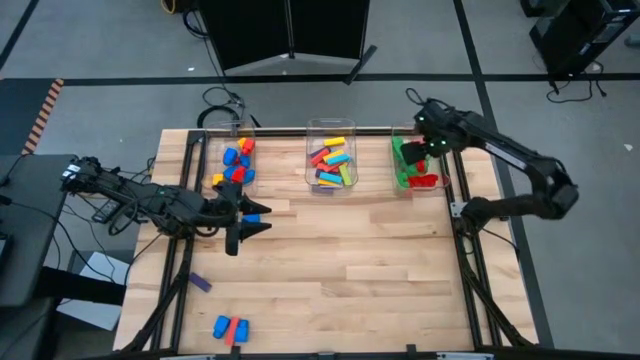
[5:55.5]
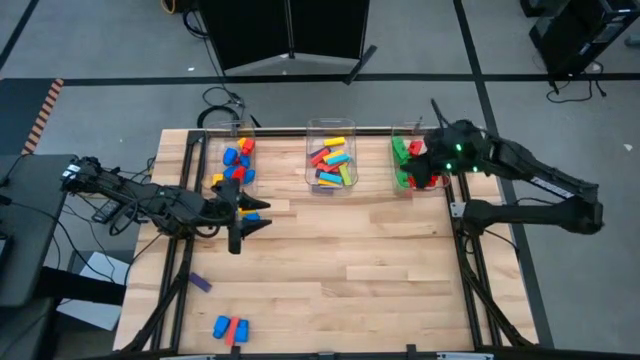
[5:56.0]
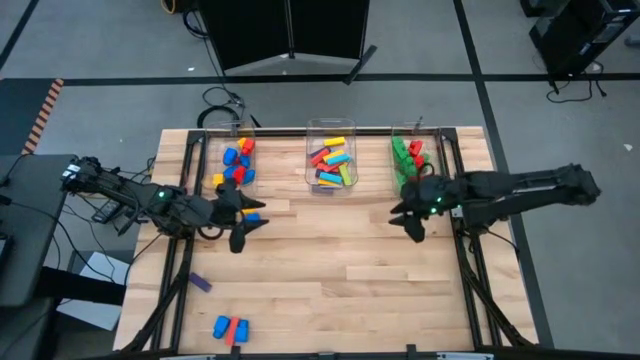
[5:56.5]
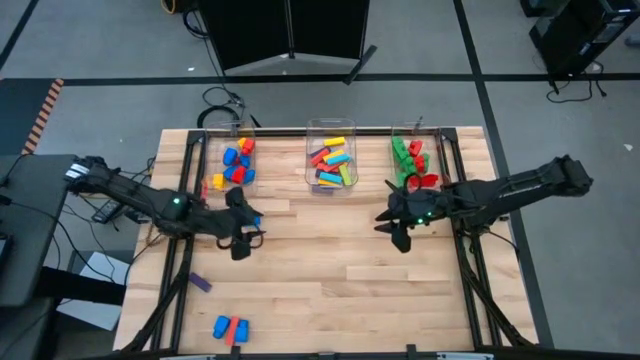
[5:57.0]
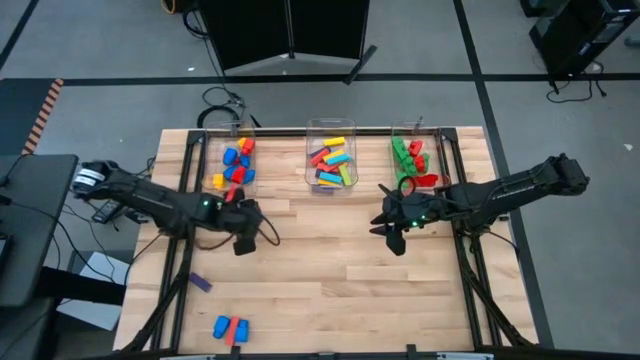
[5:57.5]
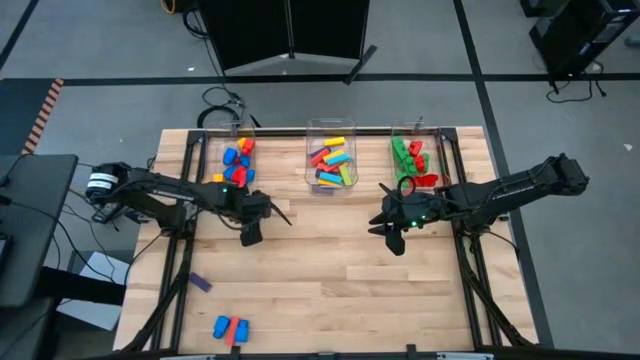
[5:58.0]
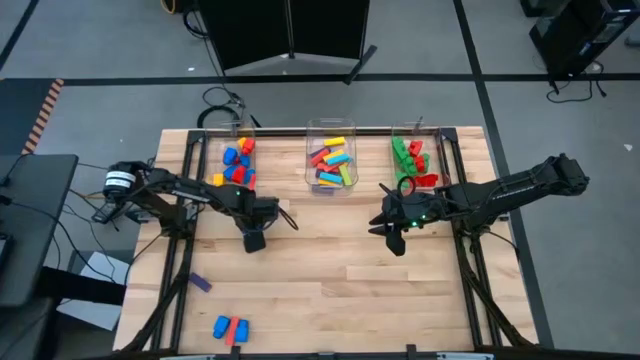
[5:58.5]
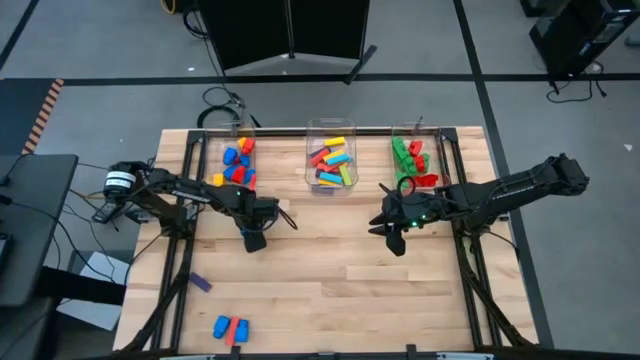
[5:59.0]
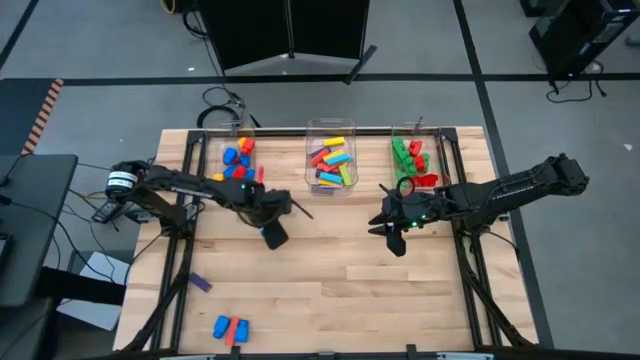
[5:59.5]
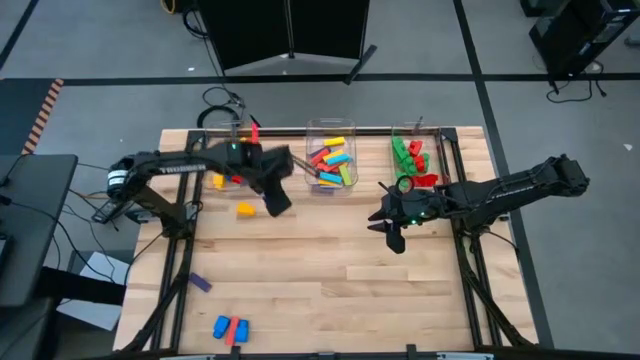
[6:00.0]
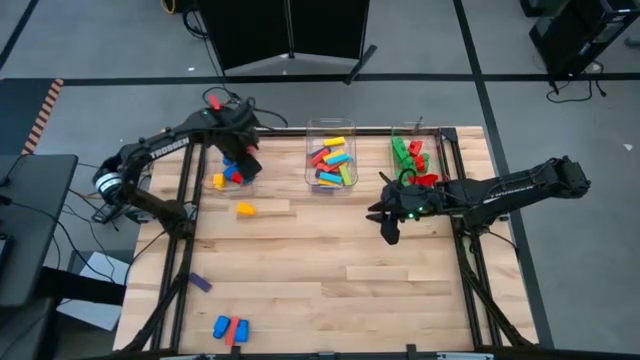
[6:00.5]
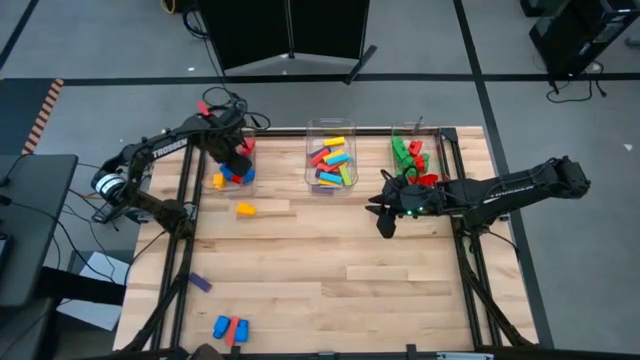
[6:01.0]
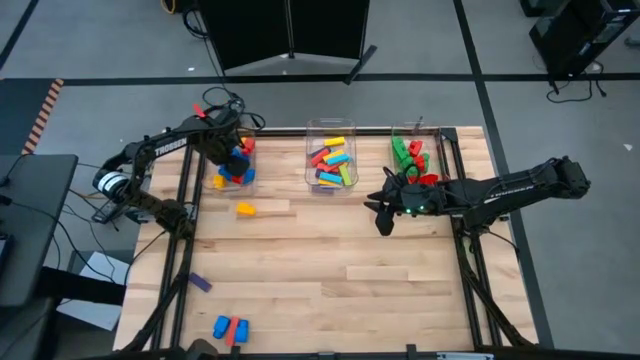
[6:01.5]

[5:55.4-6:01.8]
Task: Sort blocks by size
Put the blue 2 stud game piece into the right transparent bin

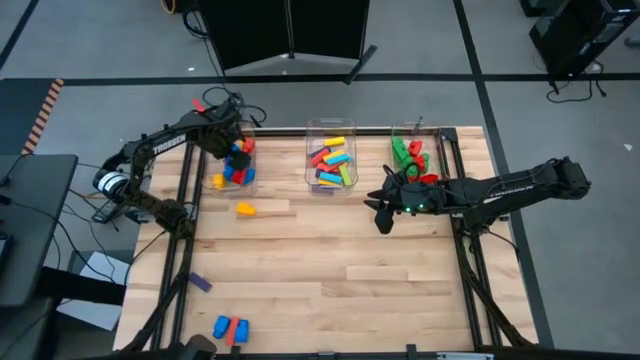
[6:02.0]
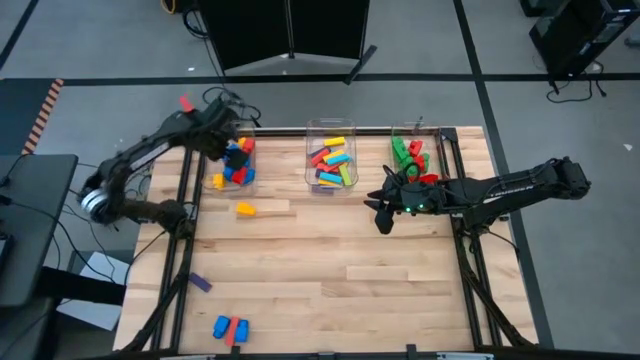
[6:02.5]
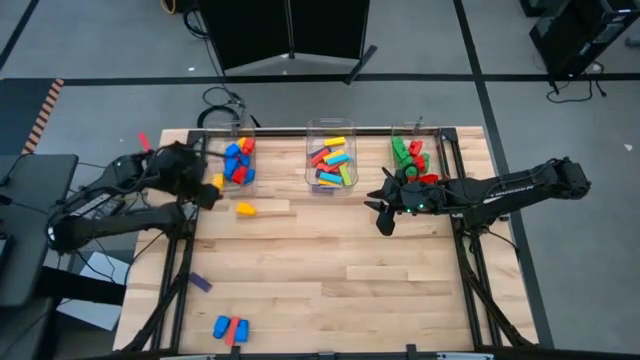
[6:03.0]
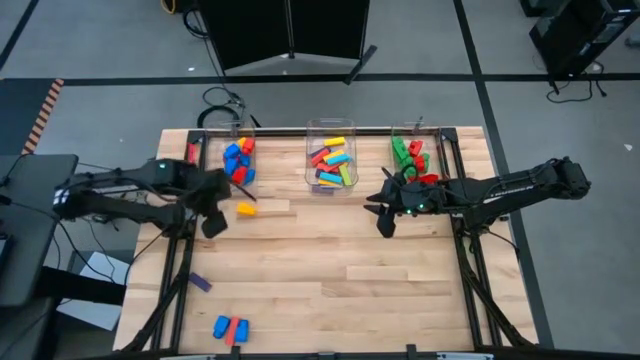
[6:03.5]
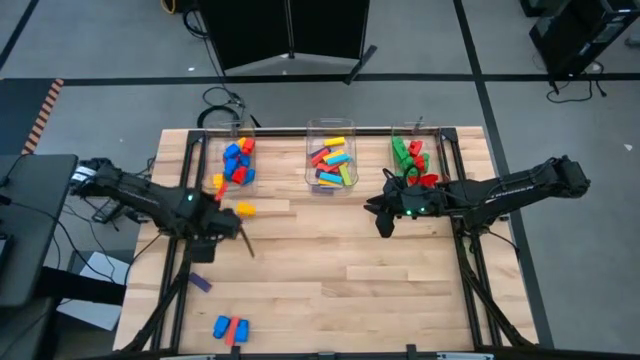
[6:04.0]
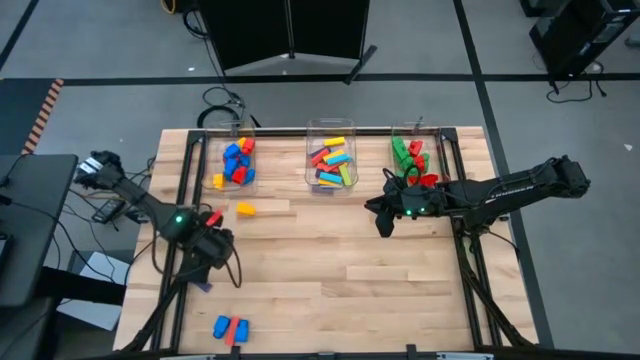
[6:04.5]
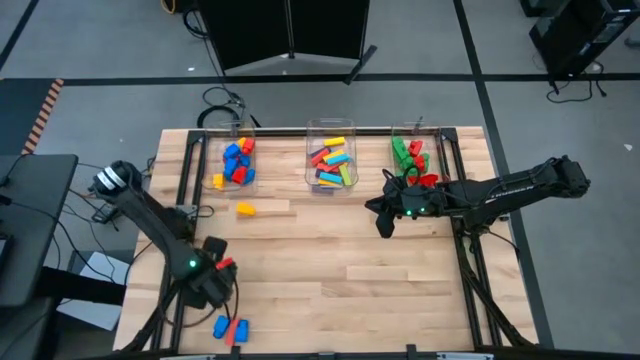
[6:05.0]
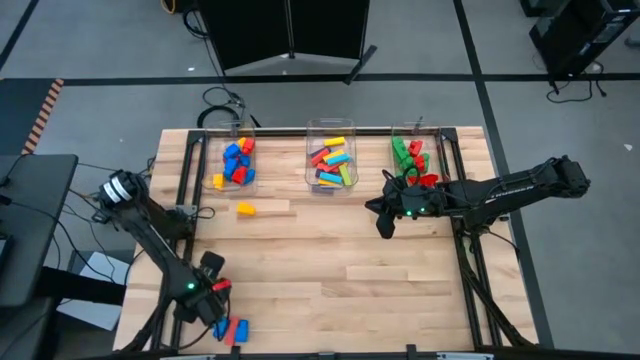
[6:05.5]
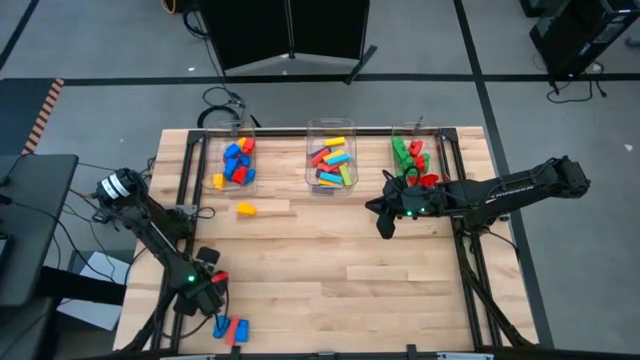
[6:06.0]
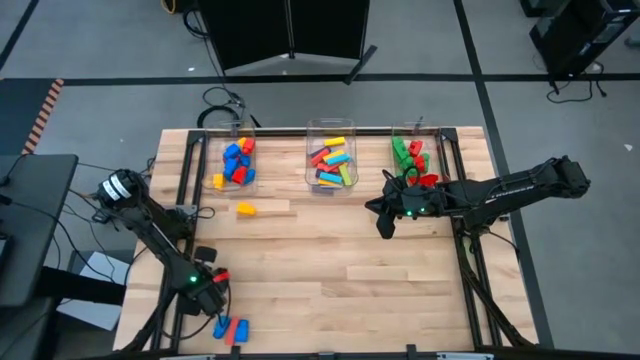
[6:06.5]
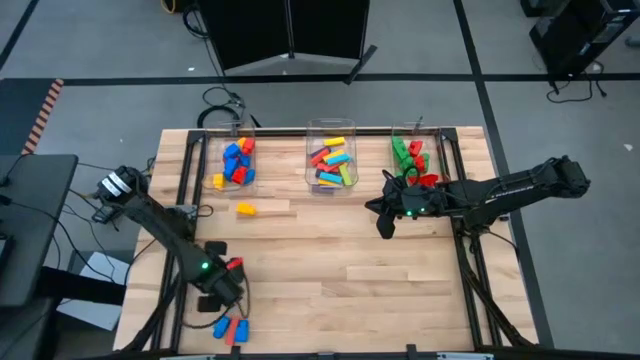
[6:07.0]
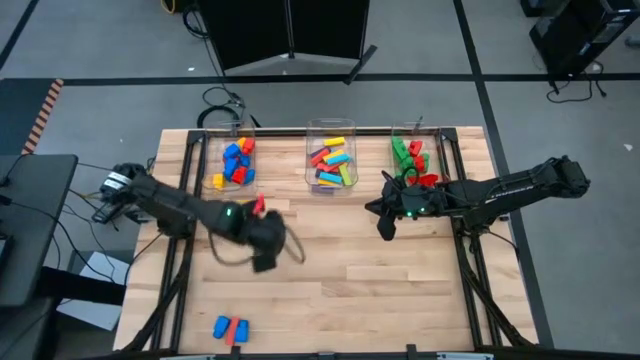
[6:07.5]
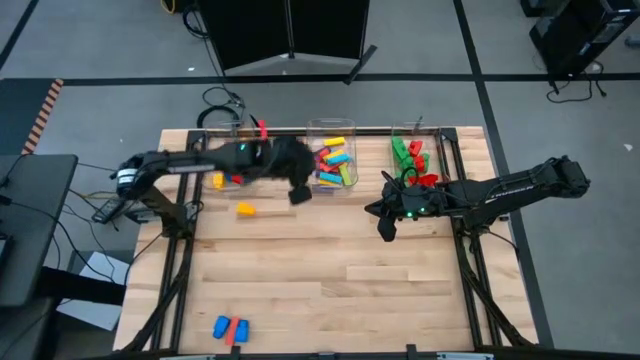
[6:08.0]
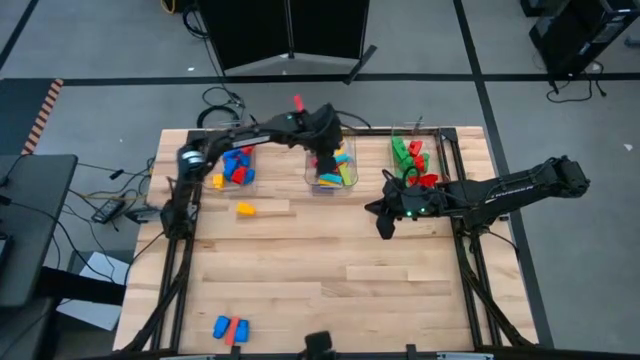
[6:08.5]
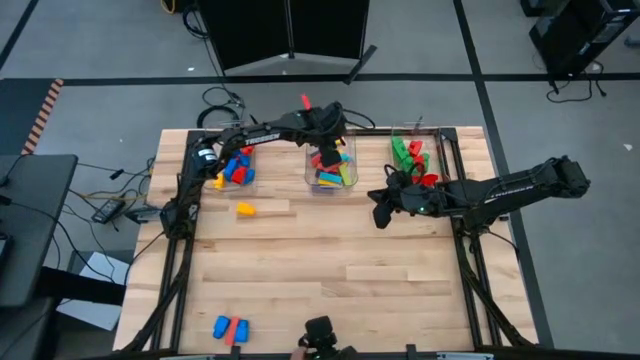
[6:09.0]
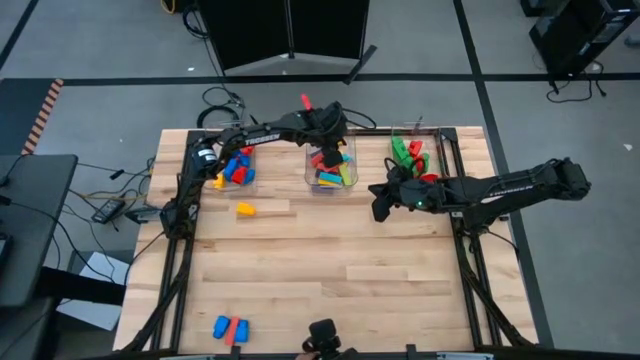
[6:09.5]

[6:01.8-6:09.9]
Put the purple block into the middle transparent bin

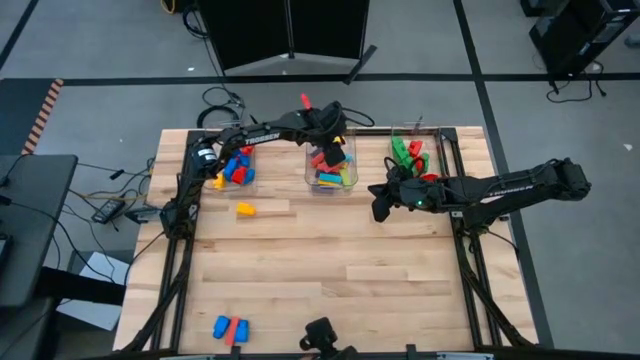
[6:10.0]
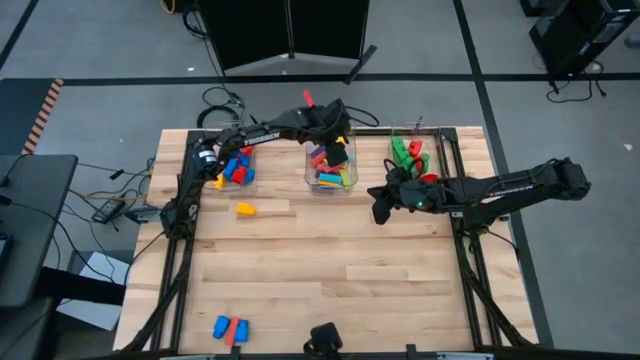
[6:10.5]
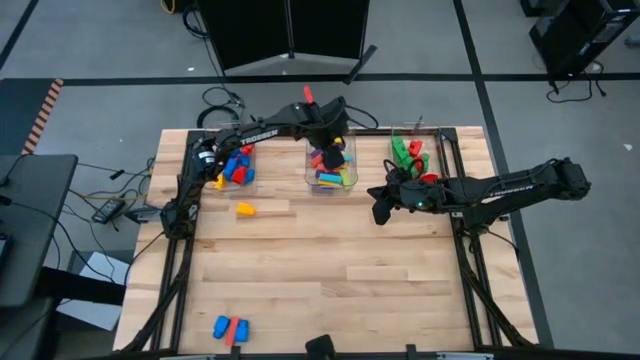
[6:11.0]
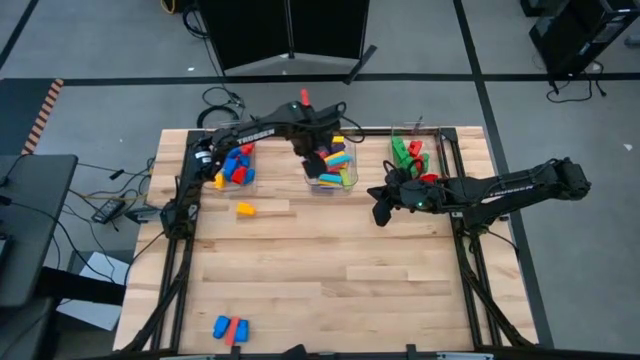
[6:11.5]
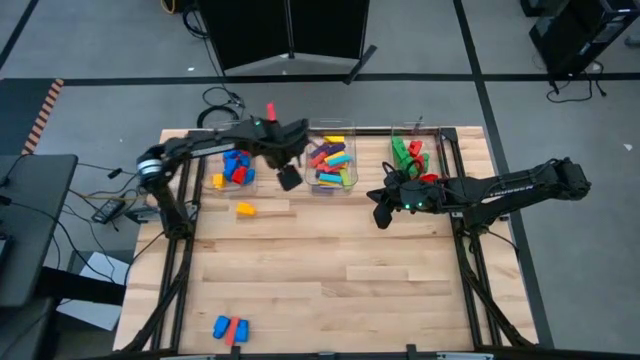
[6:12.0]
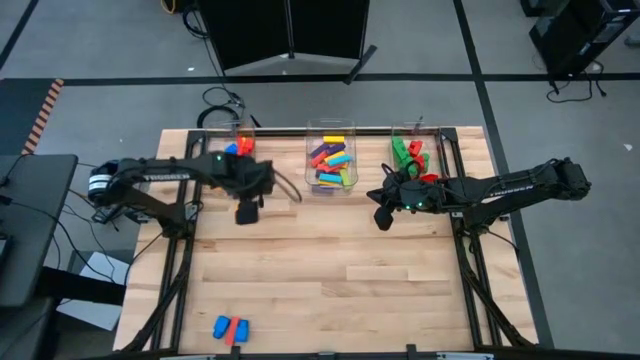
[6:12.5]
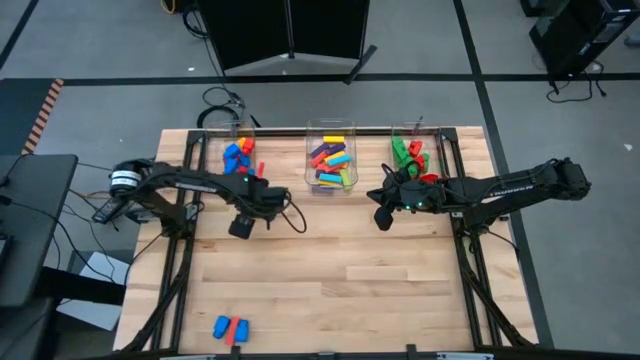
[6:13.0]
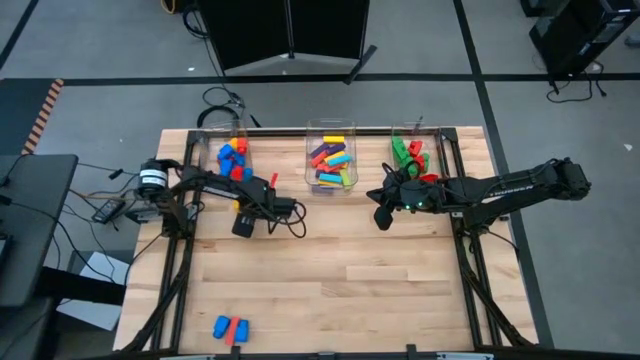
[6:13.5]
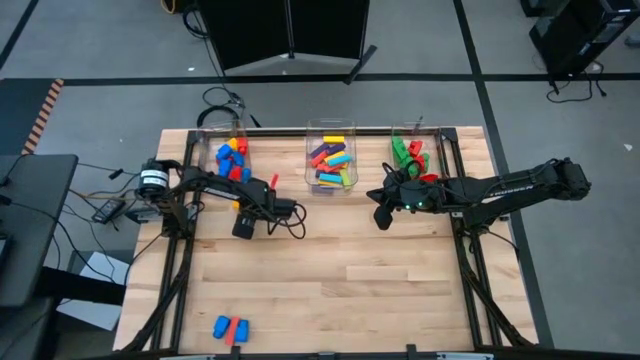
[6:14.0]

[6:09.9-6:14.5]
Put the yellow 1 stud game piece into the left transparent bin
